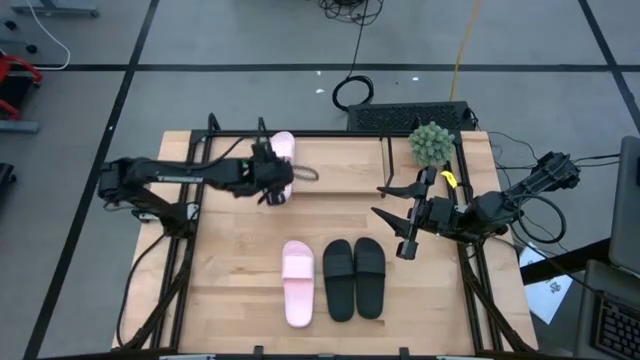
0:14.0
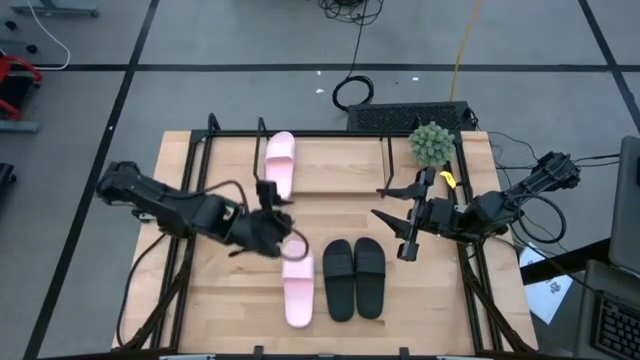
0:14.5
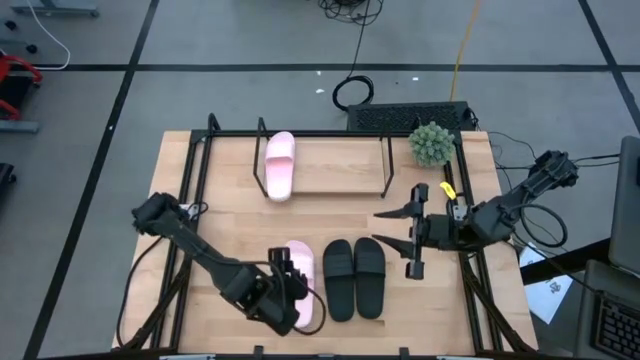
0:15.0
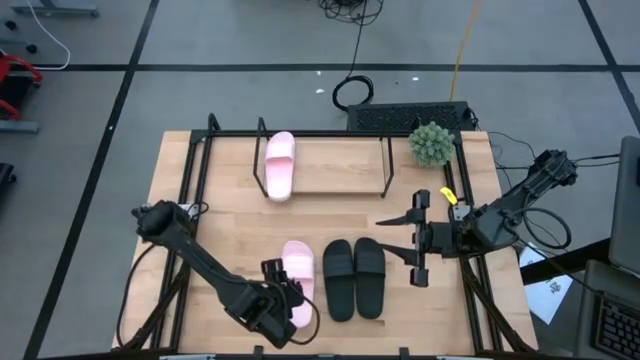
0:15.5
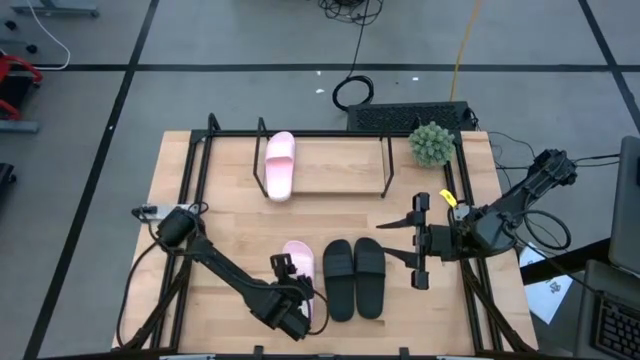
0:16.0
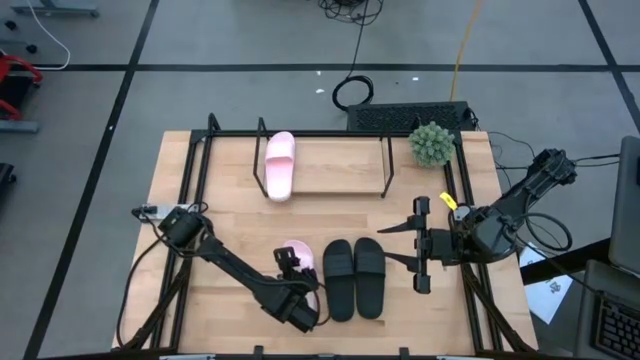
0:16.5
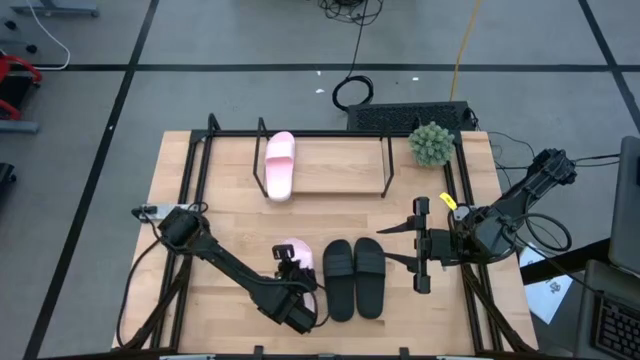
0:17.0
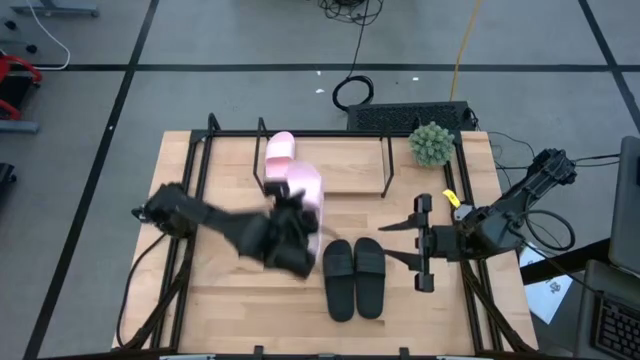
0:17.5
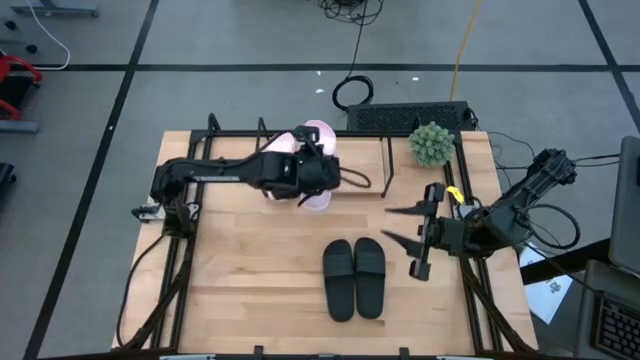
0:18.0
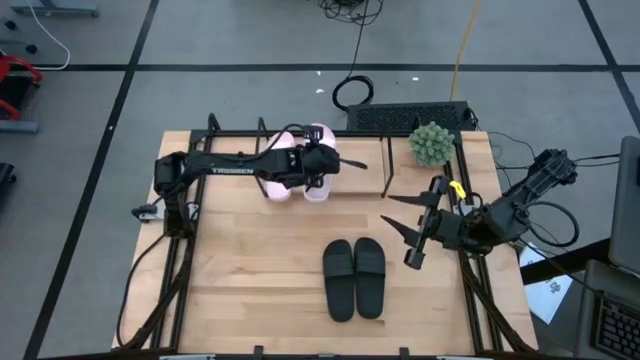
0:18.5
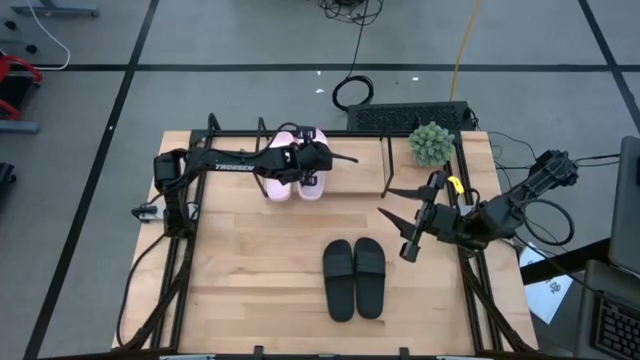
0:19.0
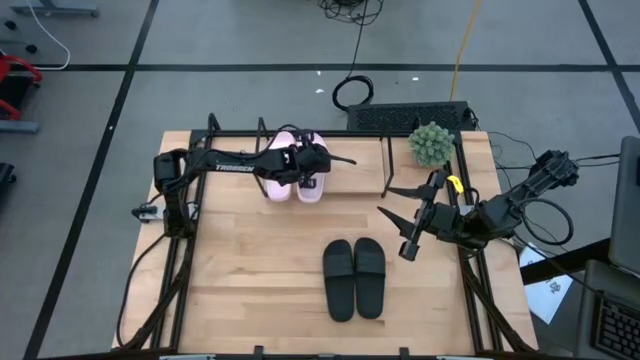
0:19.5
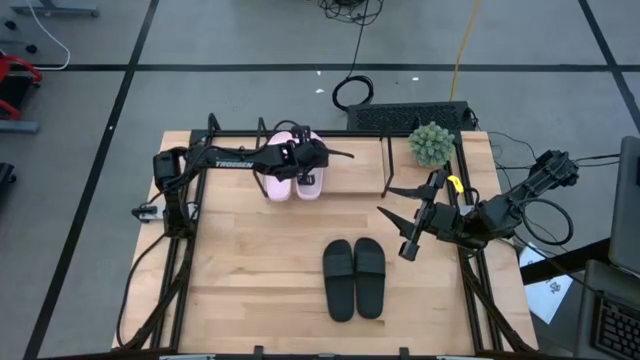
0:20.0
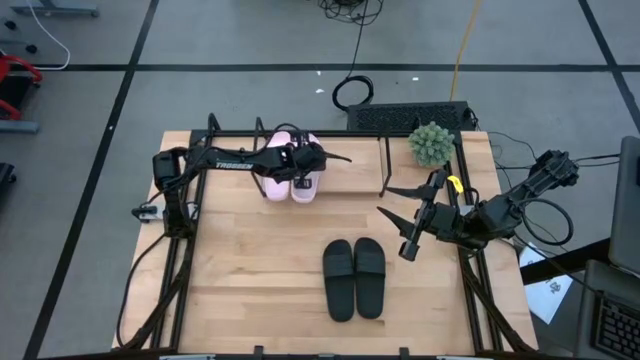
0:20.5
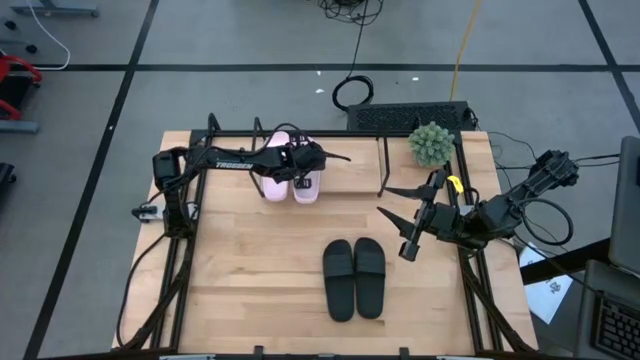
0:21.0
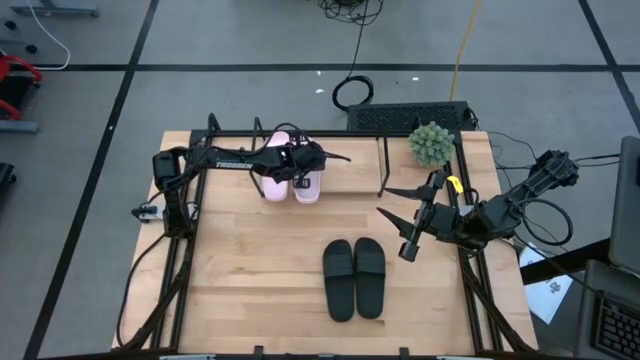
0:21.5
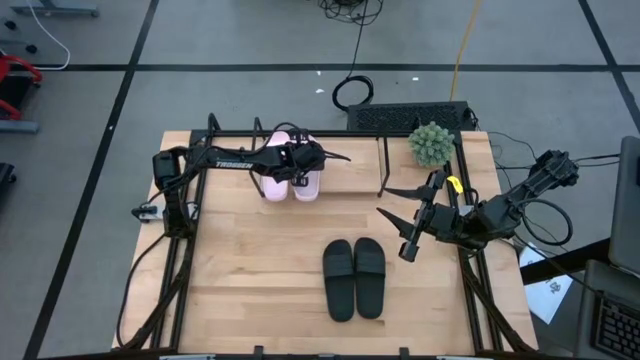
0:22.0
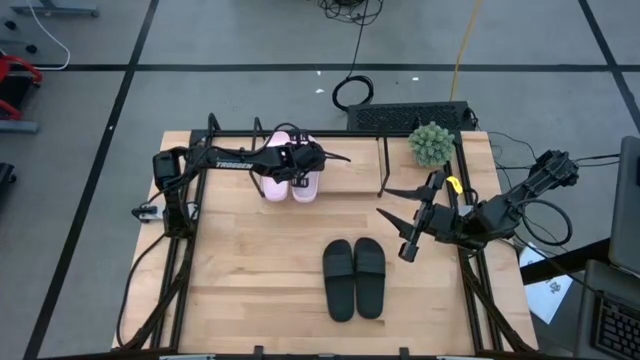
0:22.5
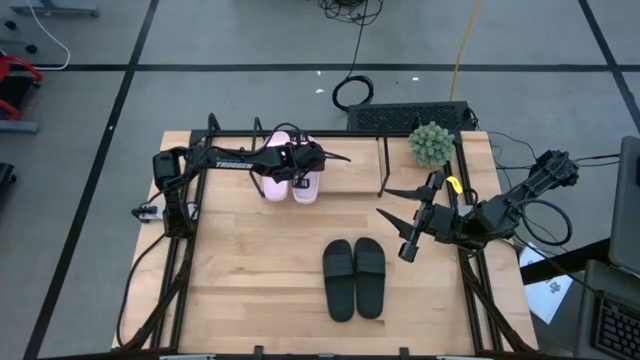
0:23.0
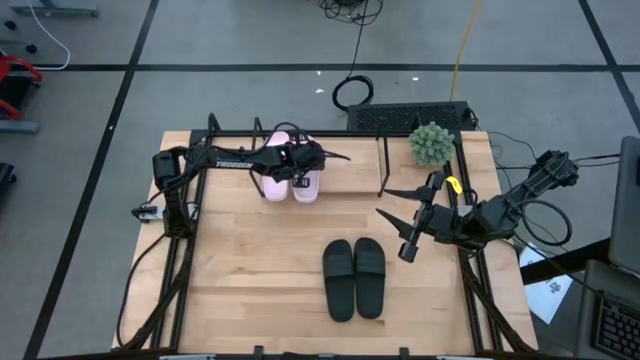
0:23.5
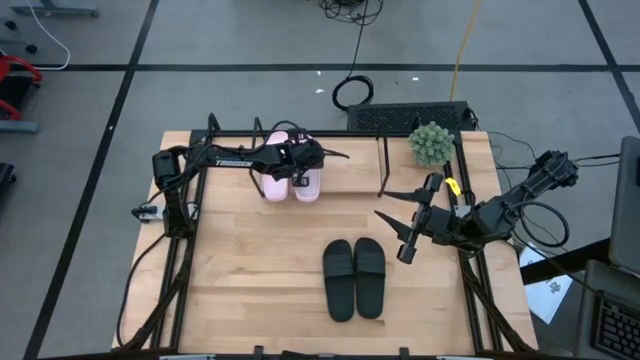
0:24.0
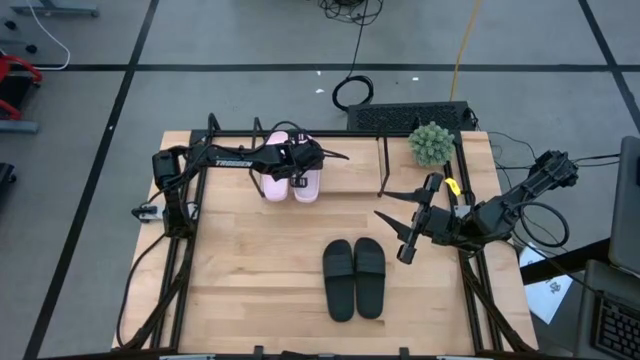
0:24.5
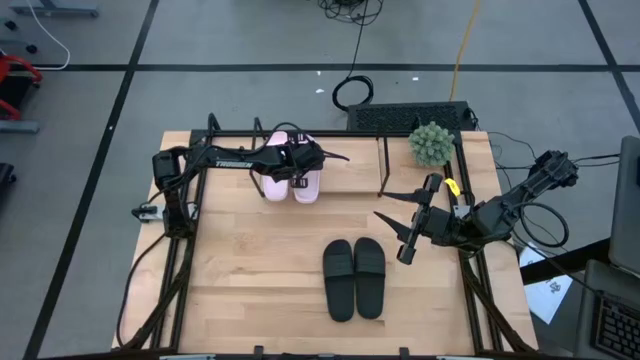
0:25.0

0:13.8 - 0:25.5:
Task: Pick and place slides into the shelf
Put the pink slipper on the shelf

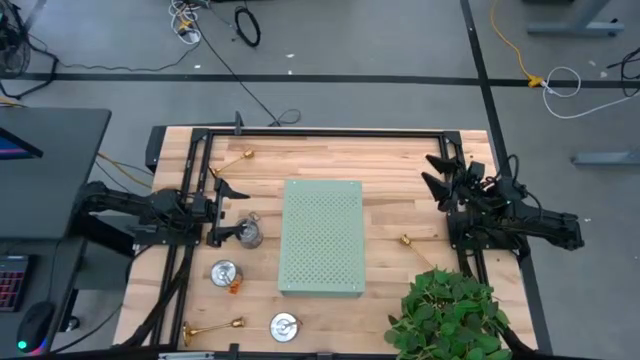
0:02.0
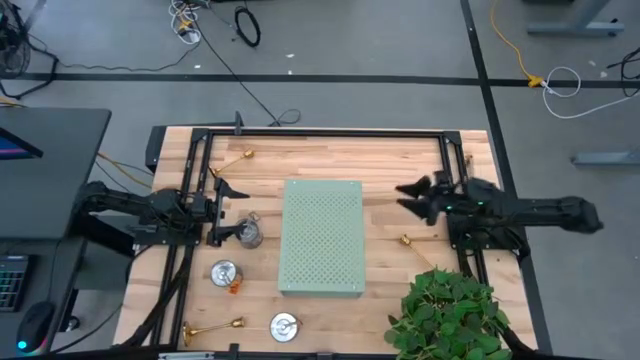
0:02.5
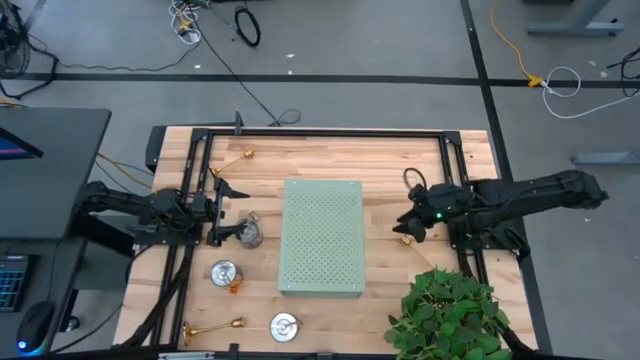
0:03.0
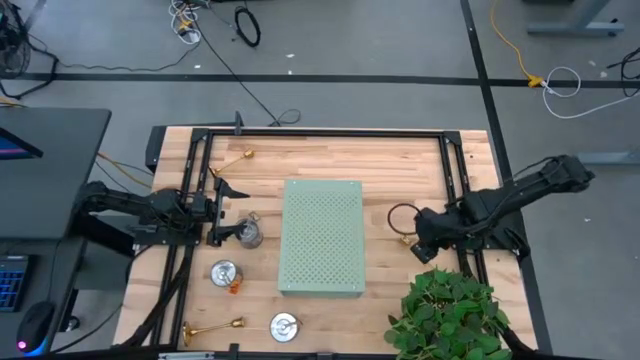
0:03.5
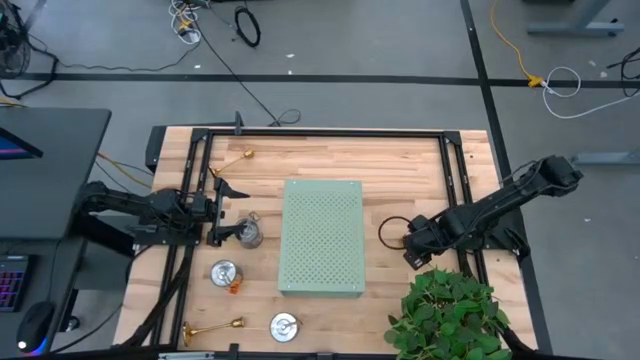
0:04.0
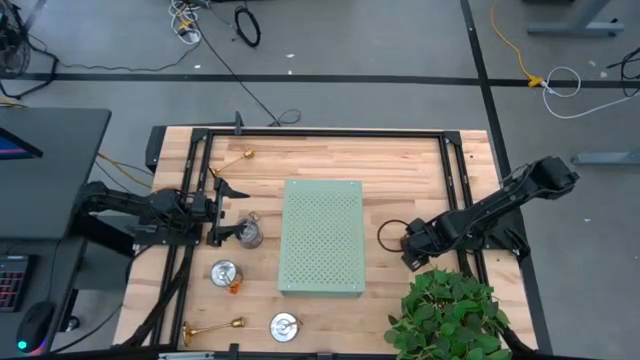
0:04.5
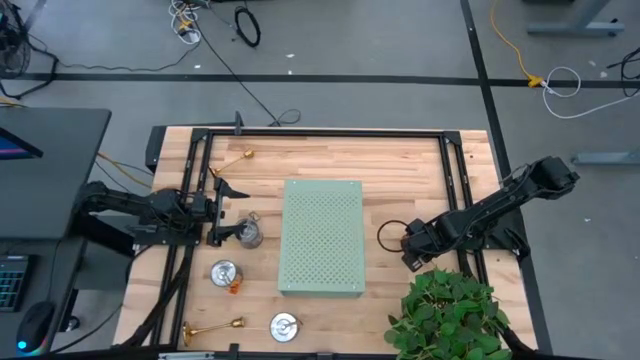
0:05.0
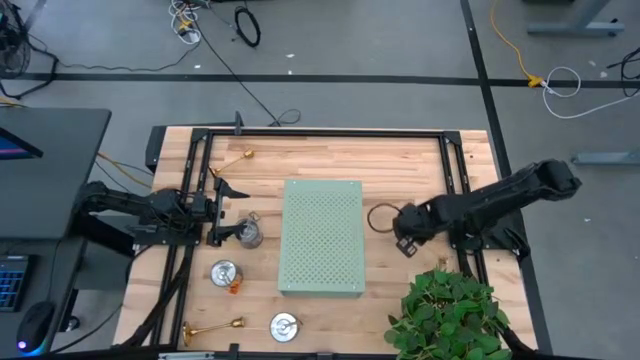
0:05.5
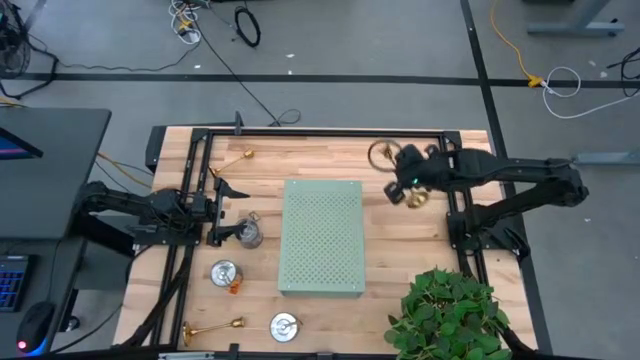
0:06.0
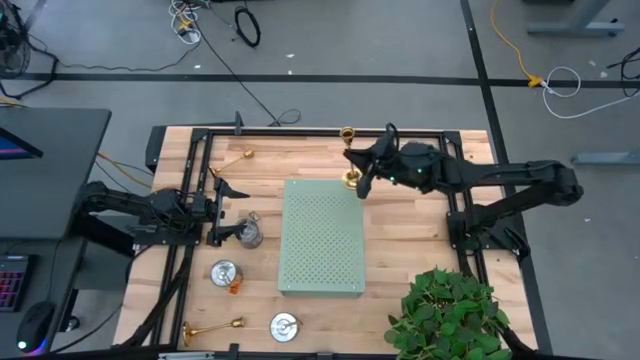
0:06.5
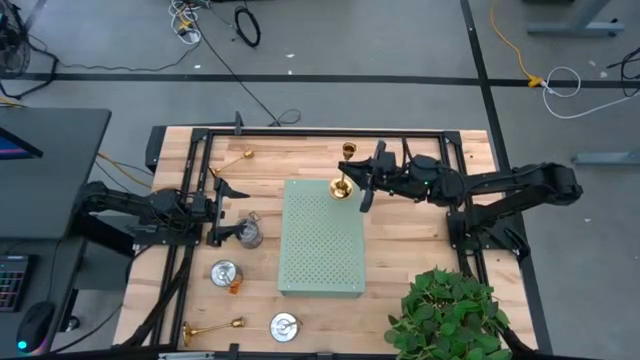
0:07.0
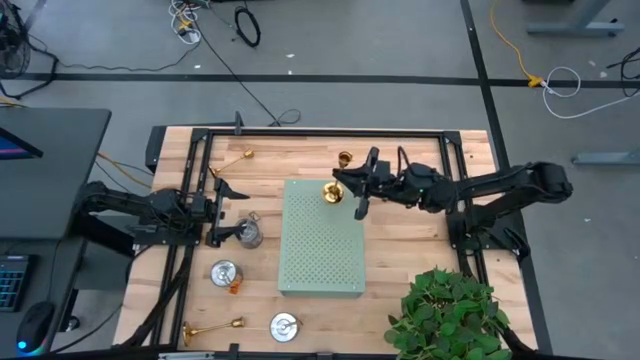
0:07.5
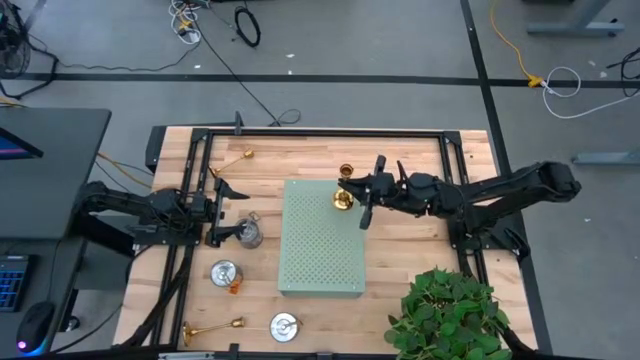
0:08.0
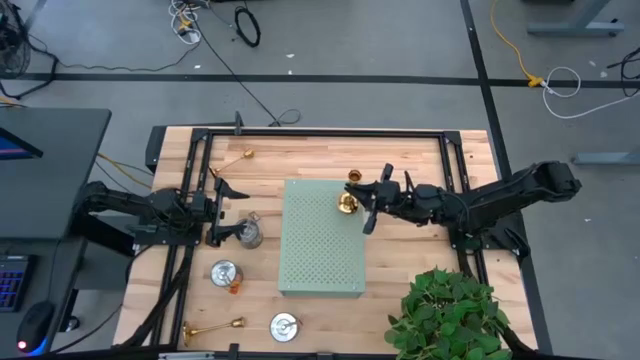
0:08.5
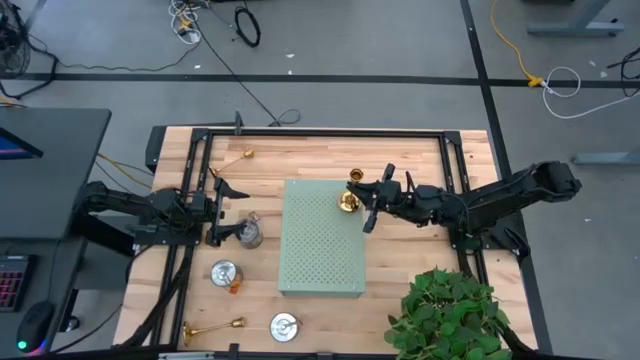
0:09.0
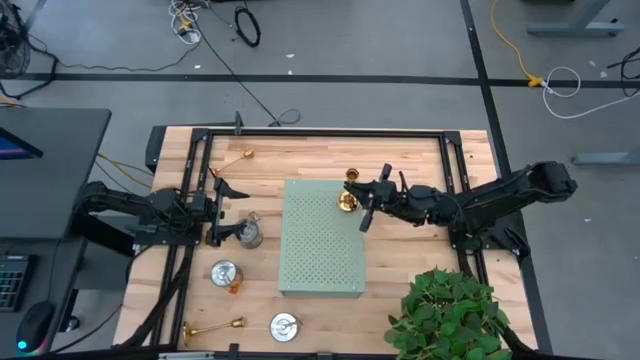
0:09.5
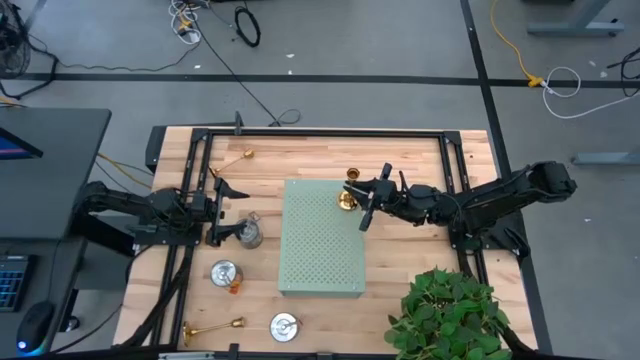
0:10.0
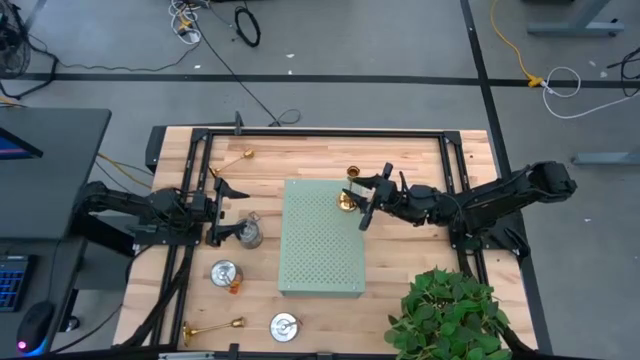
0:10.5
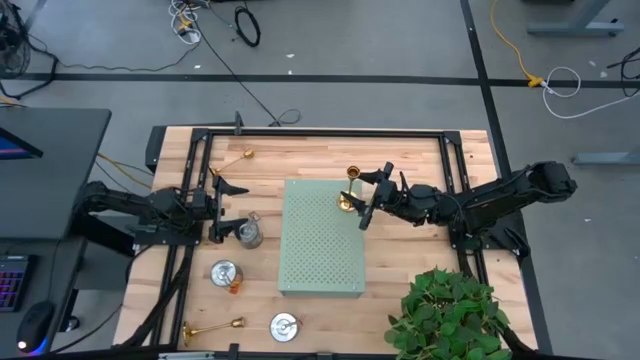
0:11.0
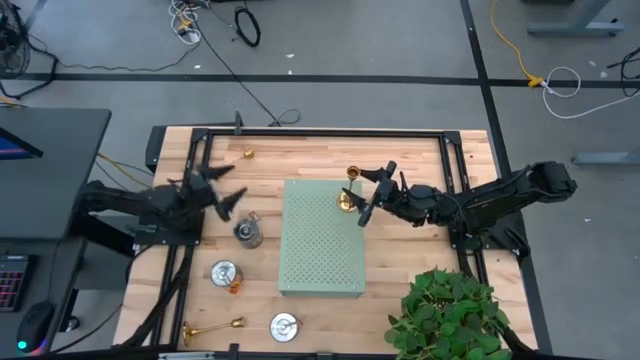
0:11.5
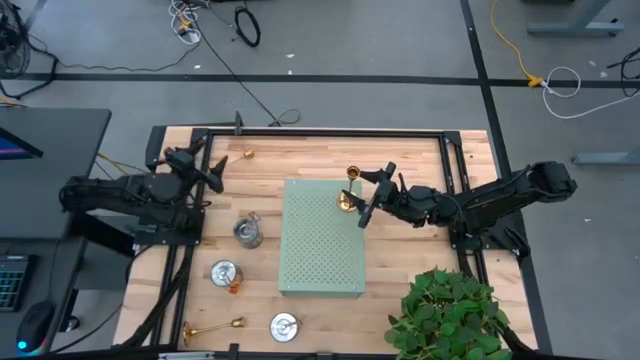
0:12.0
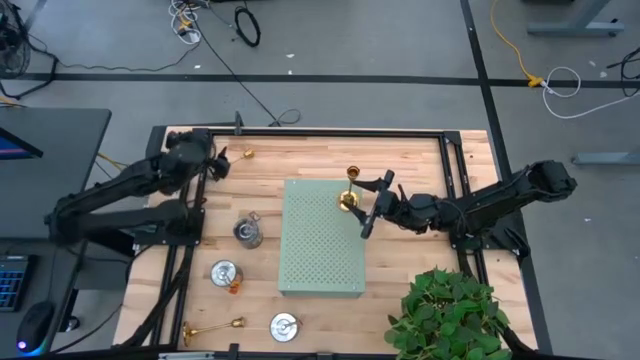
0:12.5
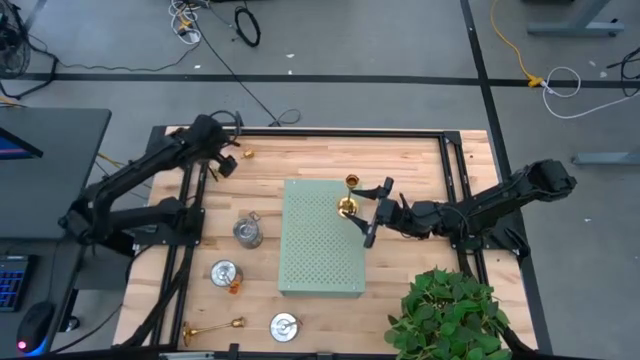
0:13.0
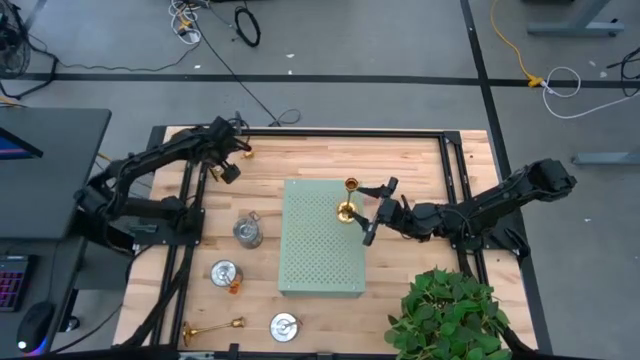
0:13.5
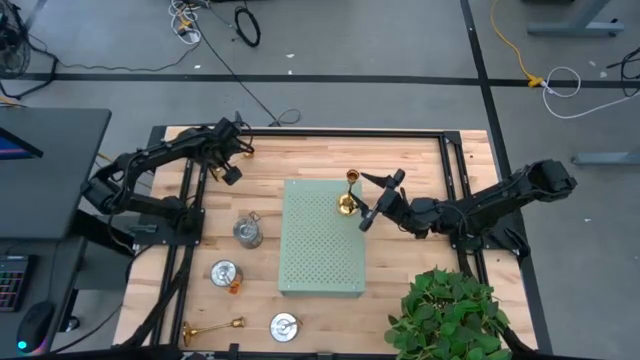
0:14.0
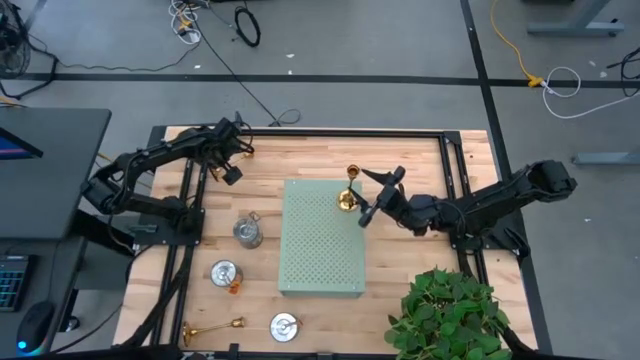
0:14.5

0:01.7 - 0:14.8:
Task: Pick & Place candle stick holders
Put the long gold candle holder on the shelf
